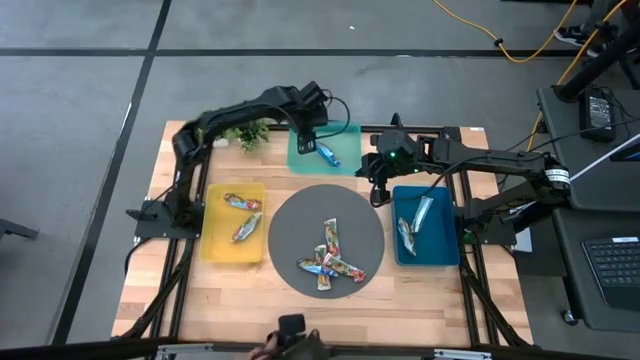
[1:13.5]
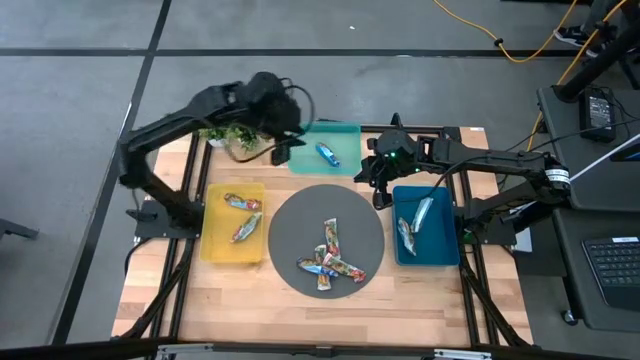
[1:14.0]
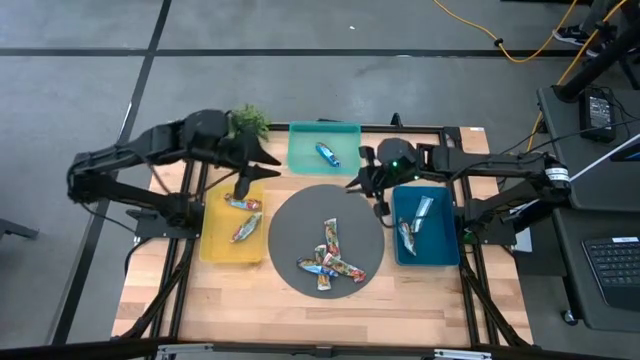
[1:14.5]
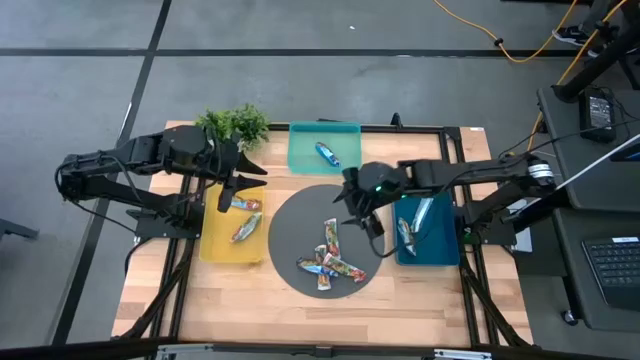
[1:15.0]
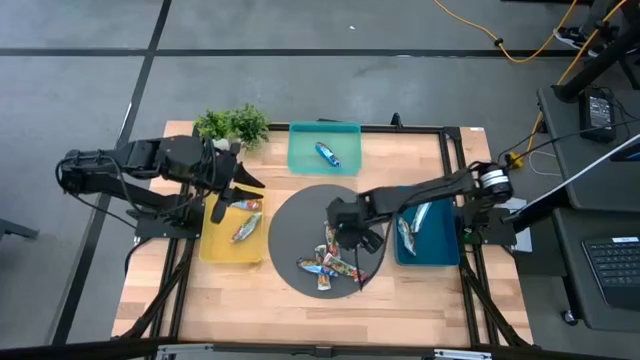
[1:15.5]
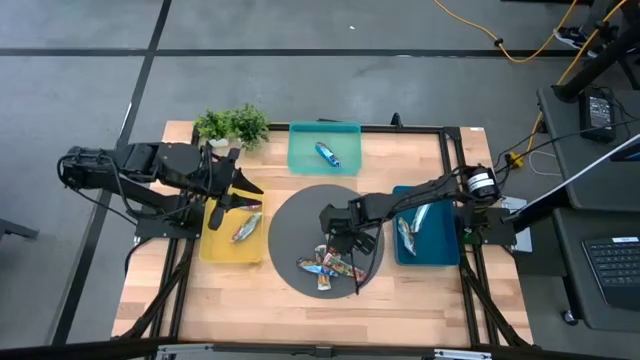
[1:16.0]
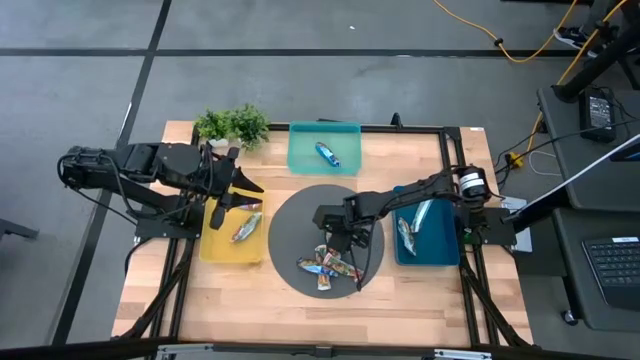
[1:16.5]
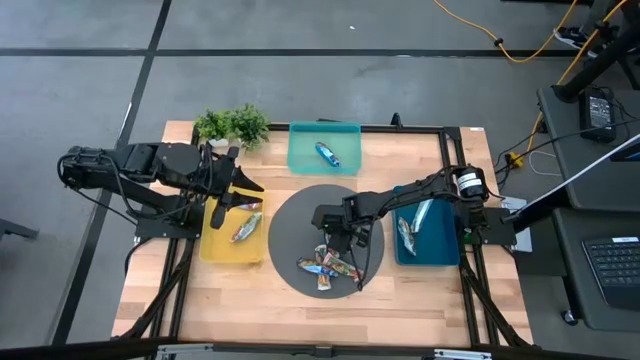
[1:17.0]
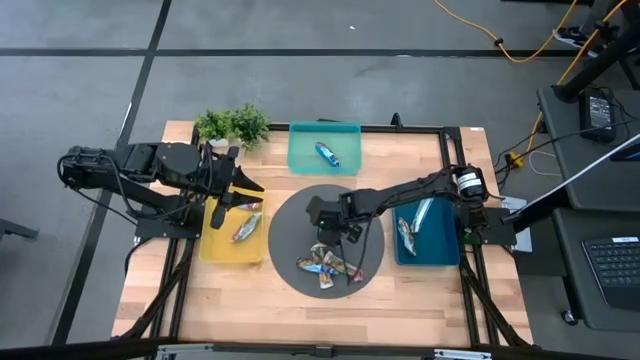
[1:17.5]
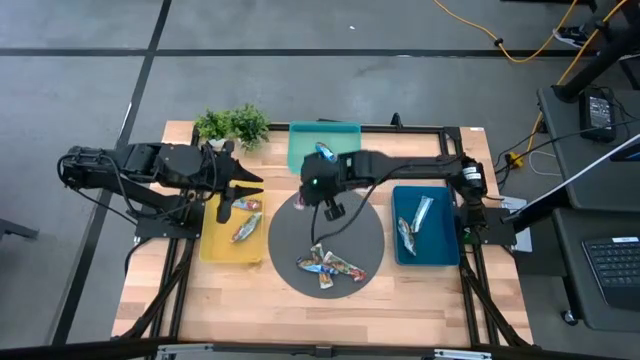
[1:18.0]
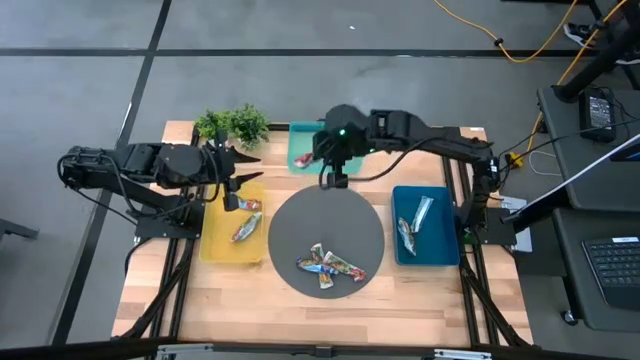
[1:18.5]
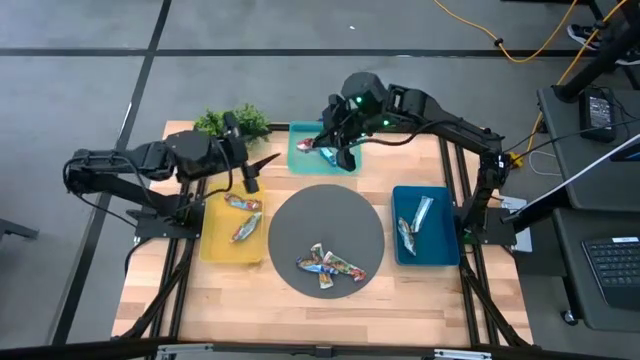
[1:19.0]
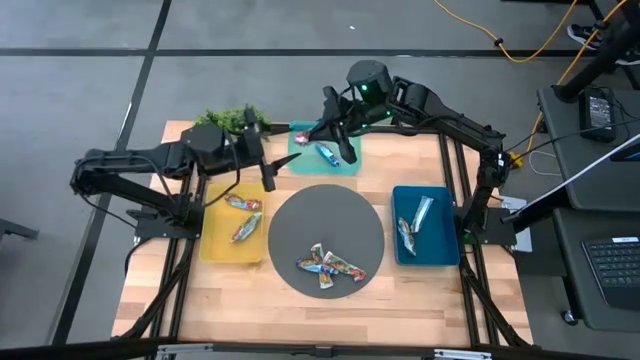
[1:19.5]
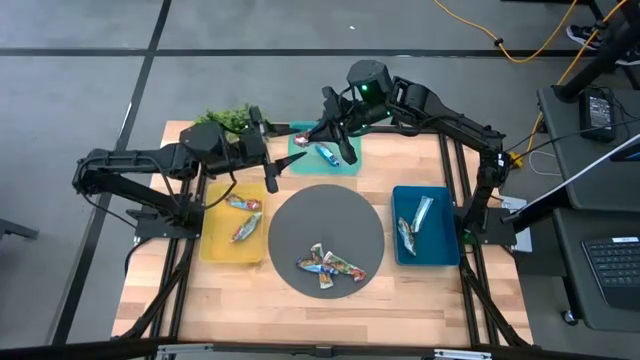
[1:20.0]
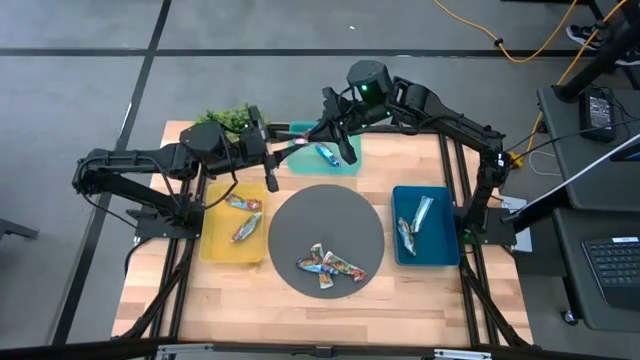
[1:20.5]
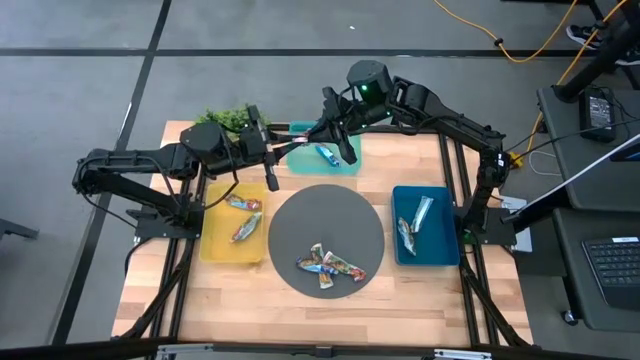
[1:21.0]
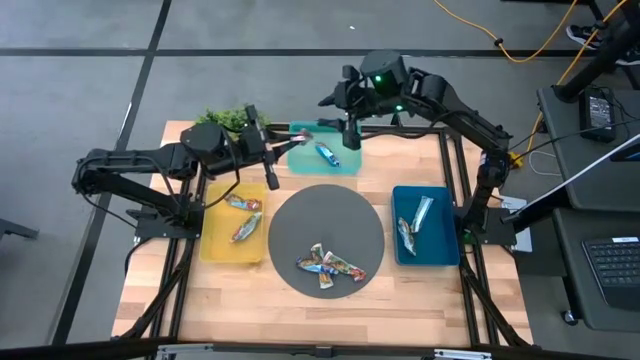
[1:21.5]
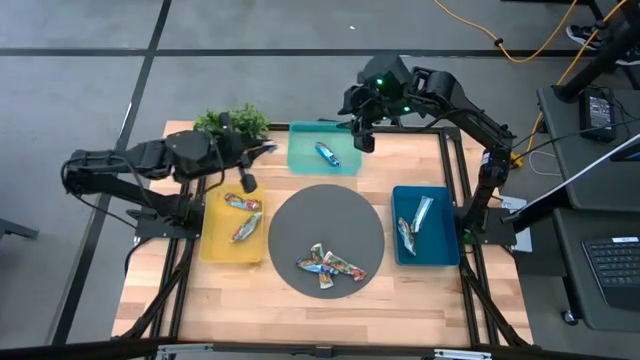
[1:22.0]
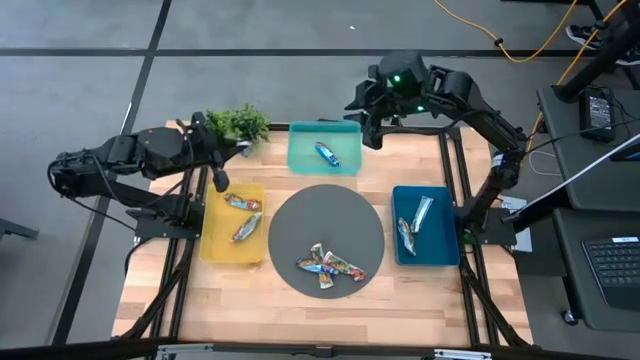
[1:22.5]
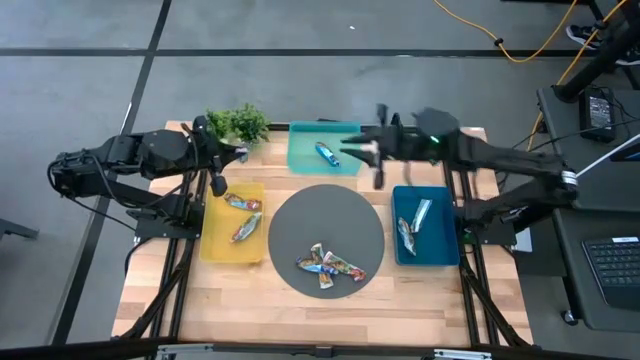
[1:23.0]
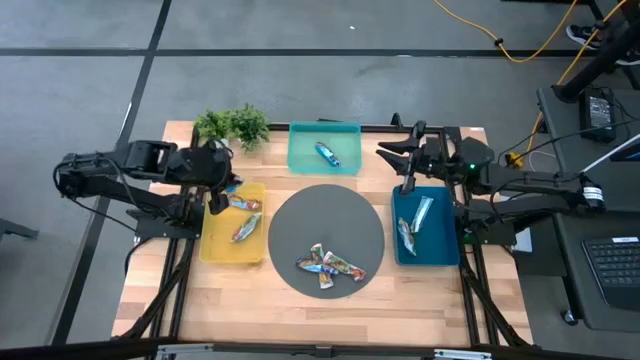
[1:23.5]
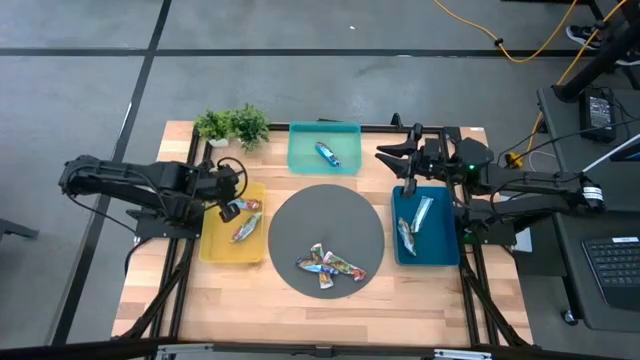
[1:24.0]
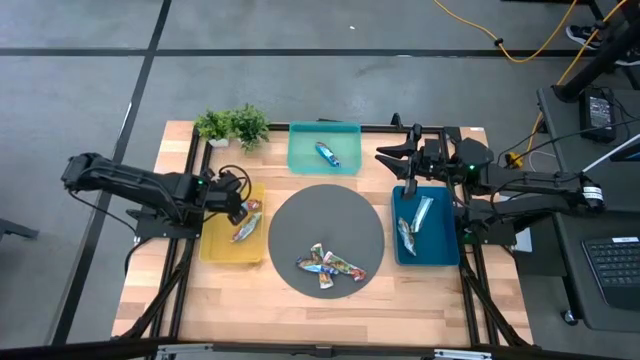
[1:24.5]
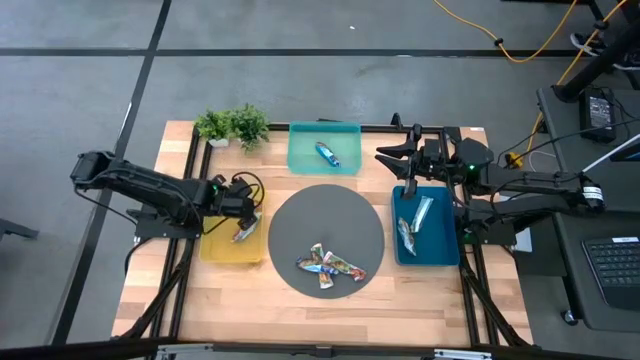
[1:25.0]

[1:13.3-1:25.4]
Task: Pick and place Granola Bars by type
Put the red granola bar into the yellow bin

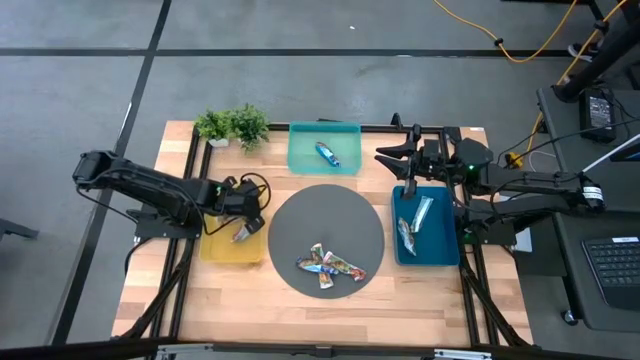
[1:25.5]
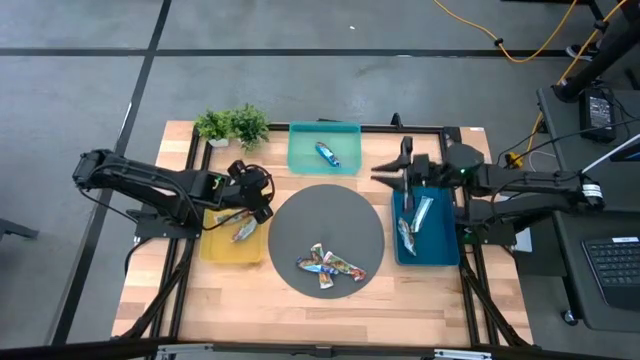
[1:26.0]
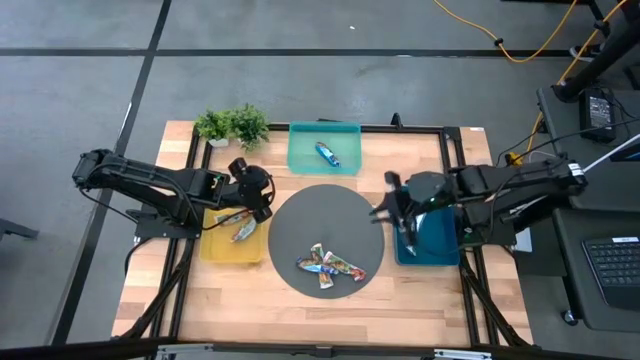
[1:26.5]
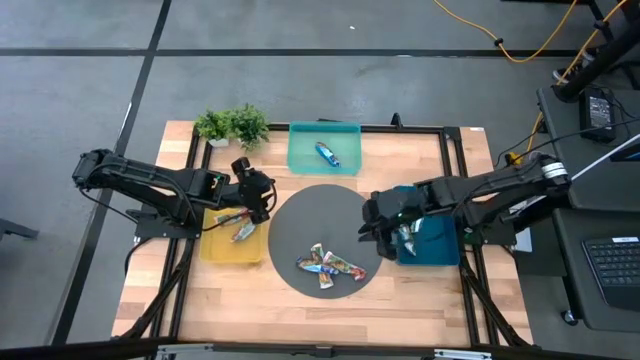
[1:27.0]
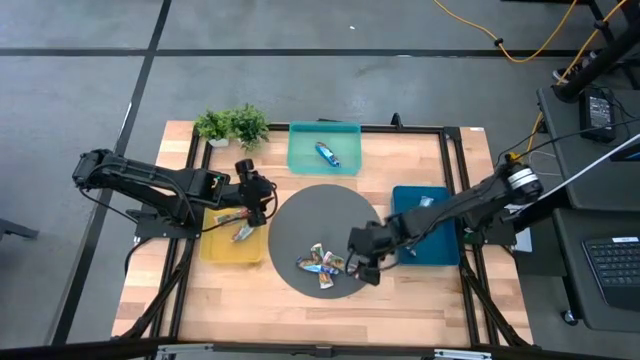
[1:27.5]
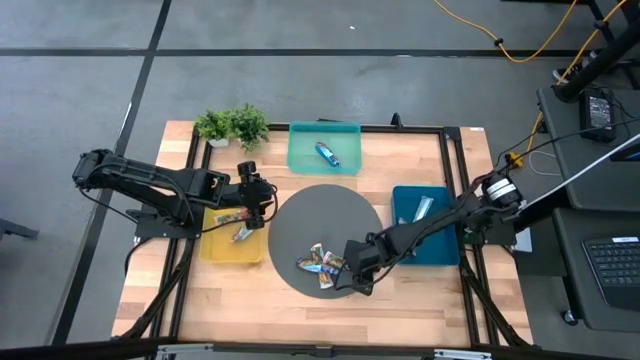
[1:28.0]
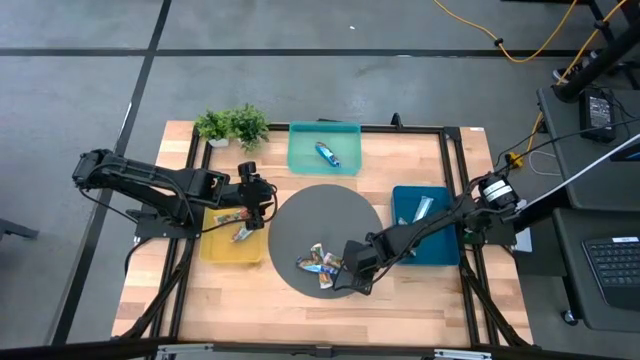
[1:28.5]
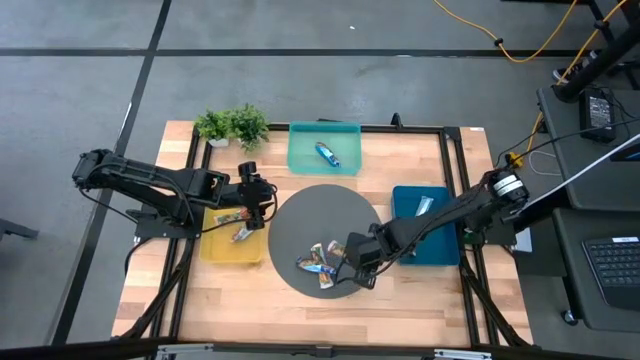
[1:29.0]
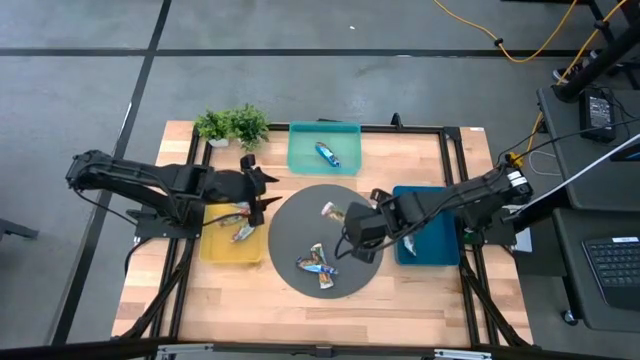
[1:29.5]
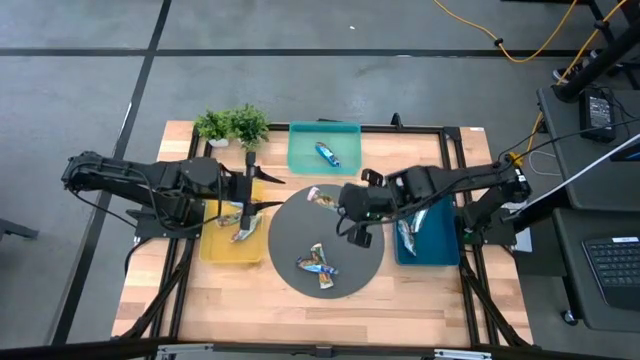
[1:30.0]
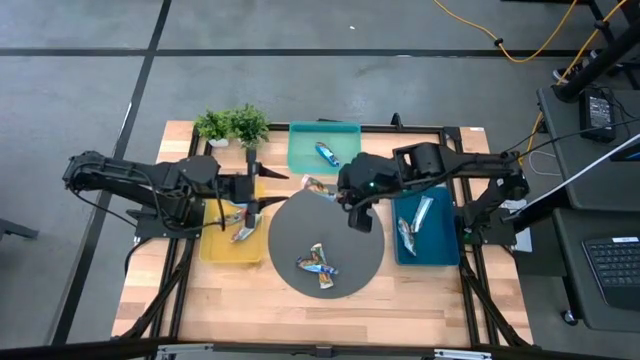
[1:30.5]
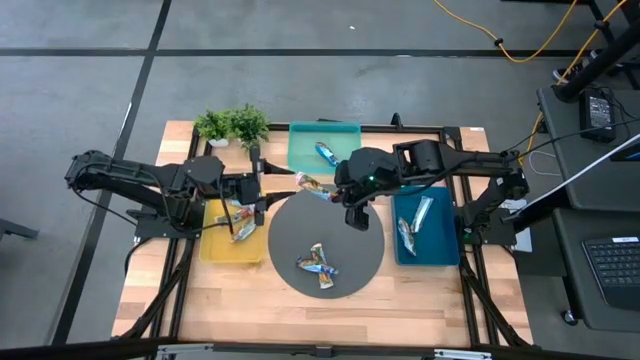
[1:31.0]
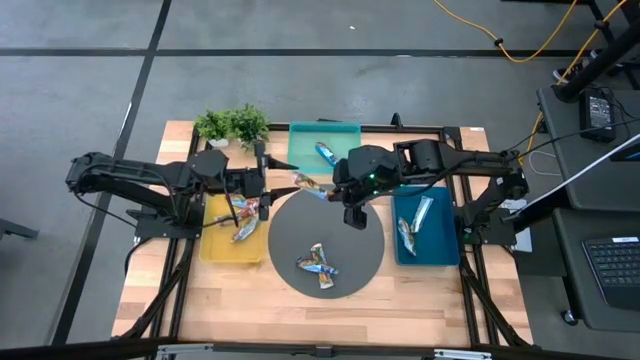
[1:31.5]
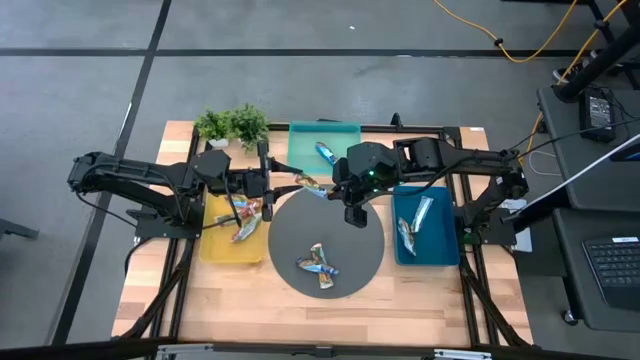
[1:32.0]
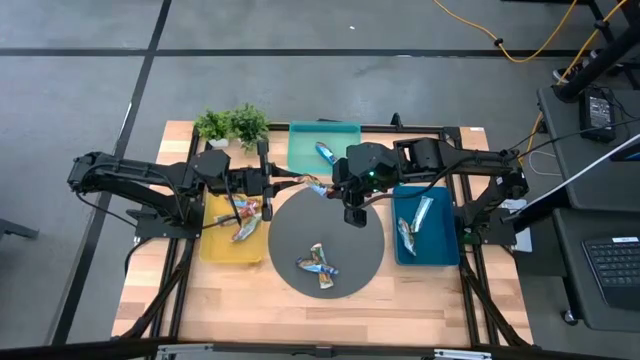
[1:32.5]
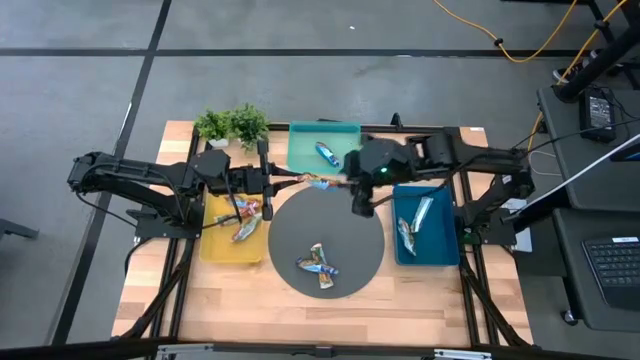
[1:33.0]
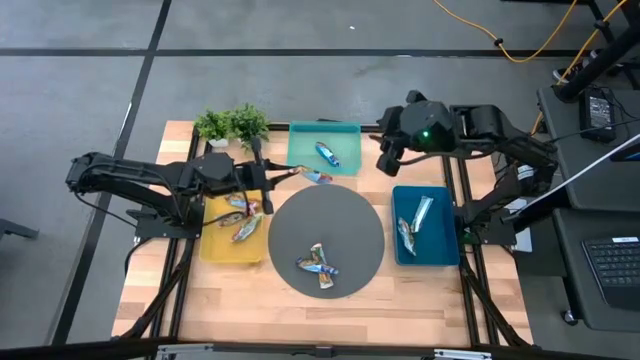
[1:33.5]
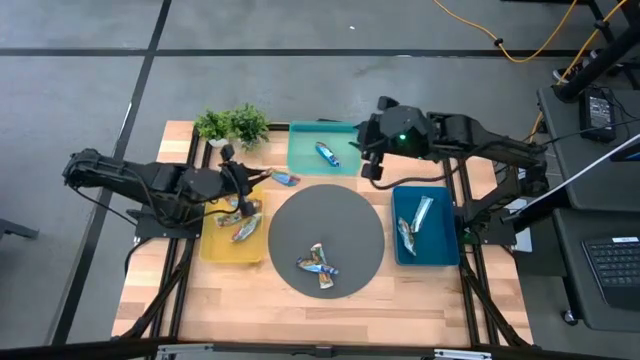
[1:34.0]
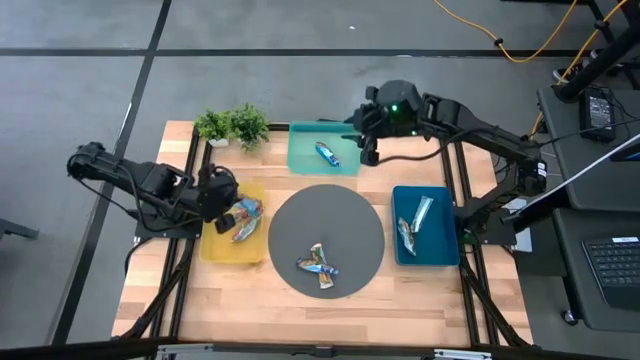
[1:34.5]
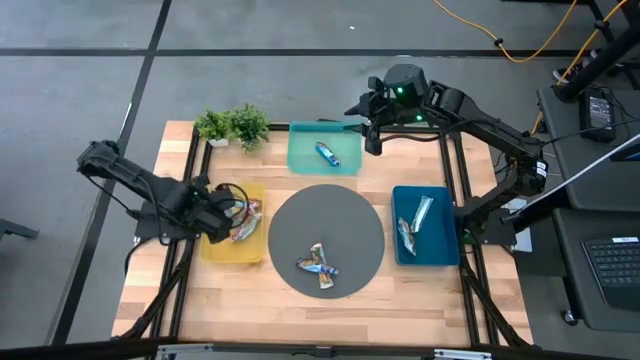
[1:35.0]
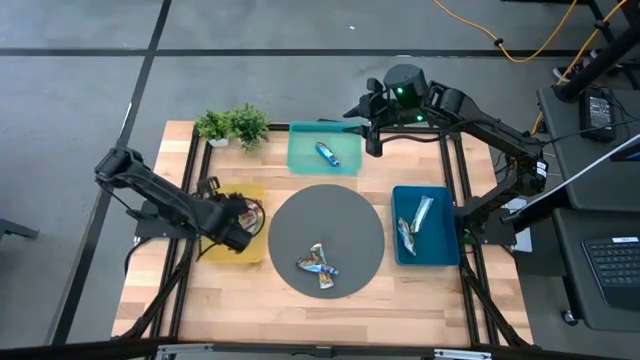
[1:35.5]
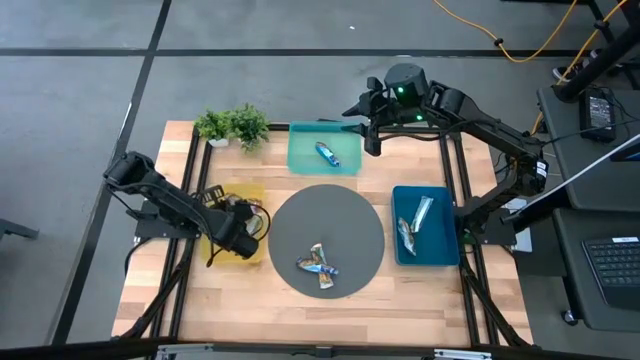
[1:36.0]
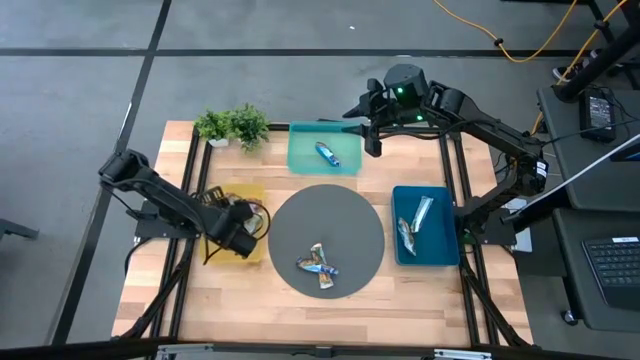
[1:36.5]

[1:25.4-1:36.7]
Put the red granola bar into the yellow bin
